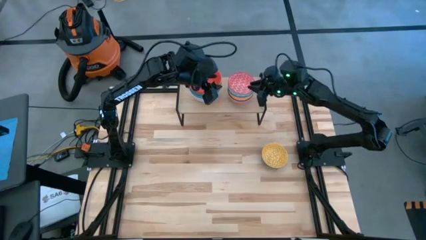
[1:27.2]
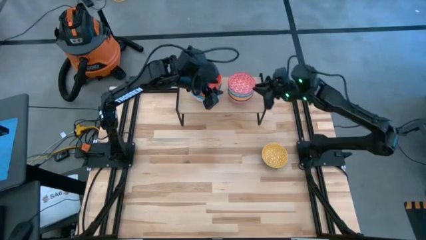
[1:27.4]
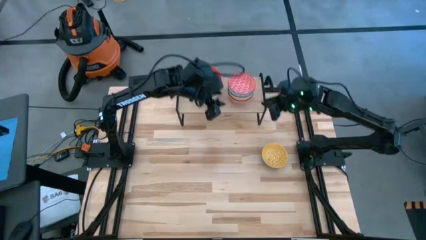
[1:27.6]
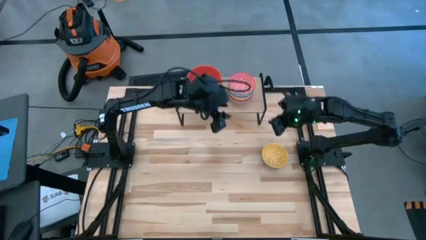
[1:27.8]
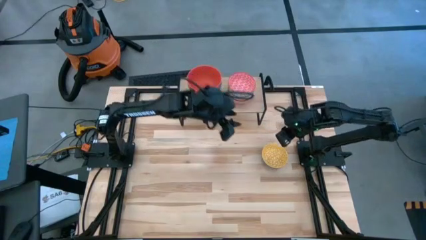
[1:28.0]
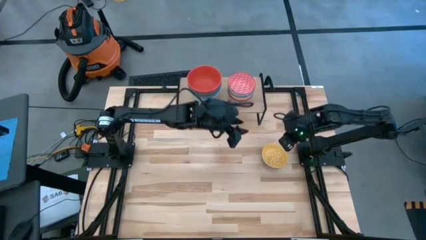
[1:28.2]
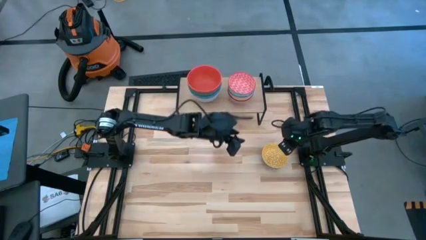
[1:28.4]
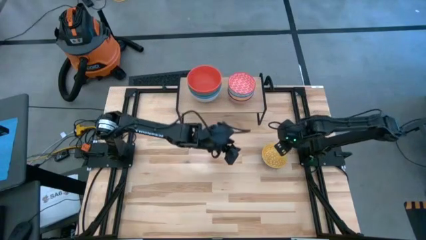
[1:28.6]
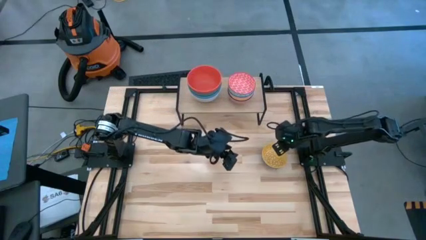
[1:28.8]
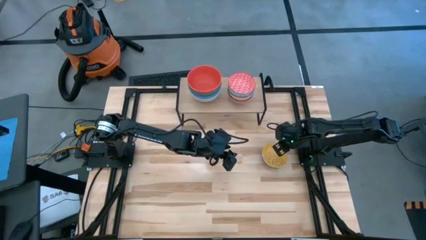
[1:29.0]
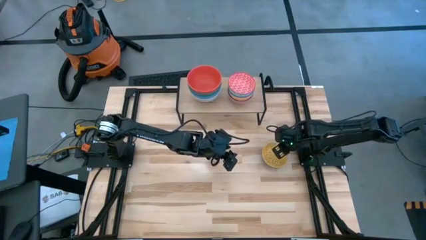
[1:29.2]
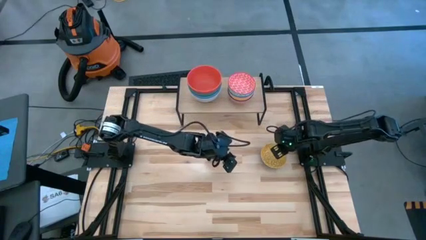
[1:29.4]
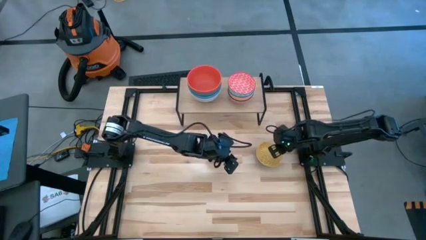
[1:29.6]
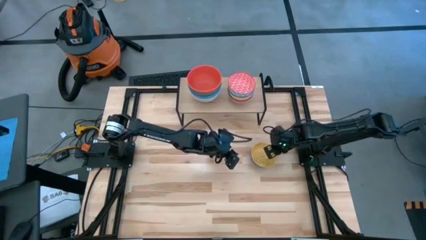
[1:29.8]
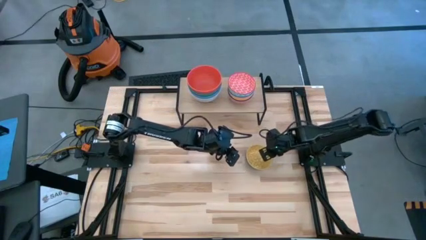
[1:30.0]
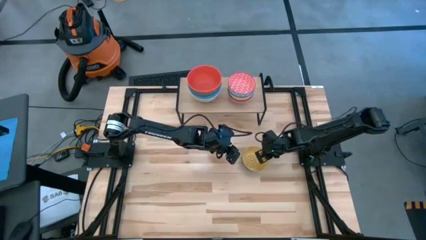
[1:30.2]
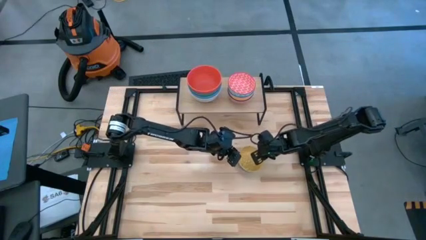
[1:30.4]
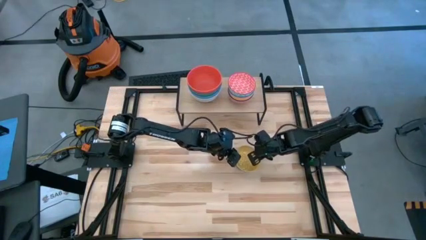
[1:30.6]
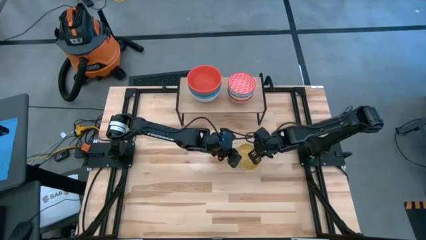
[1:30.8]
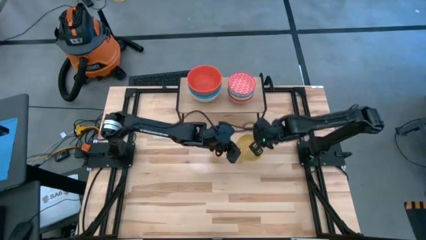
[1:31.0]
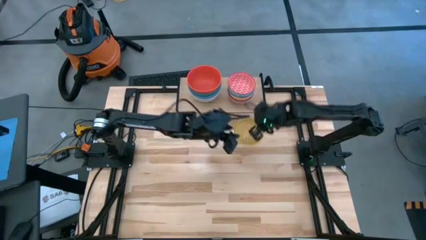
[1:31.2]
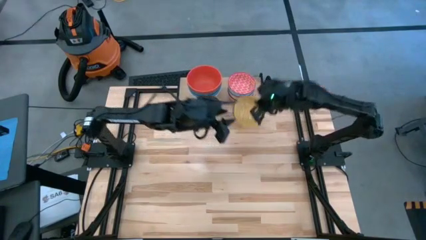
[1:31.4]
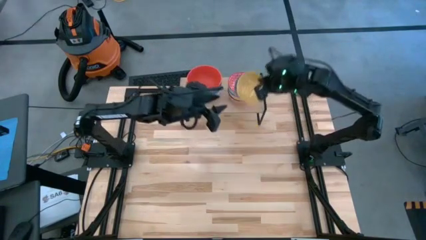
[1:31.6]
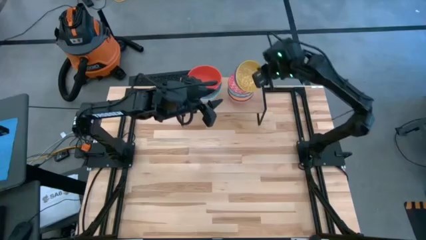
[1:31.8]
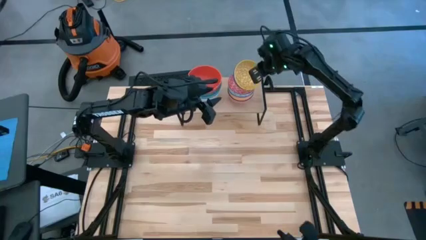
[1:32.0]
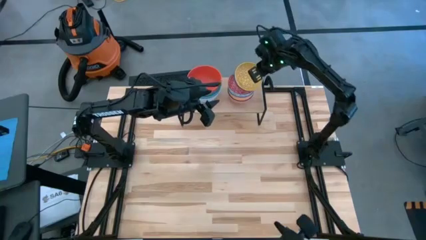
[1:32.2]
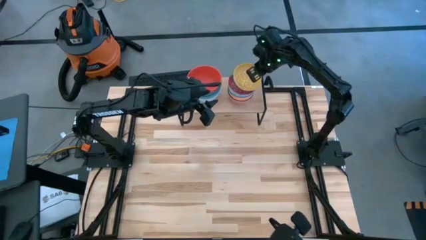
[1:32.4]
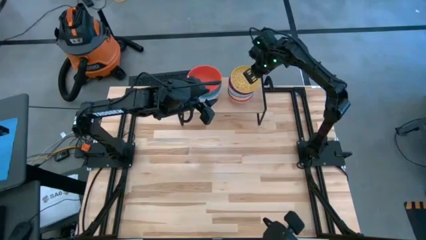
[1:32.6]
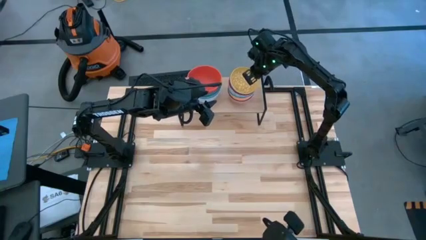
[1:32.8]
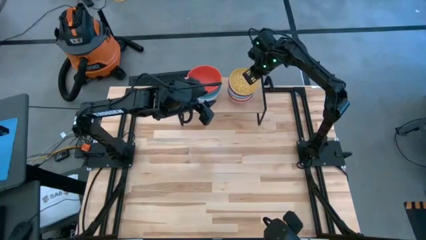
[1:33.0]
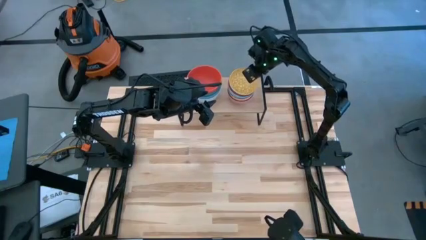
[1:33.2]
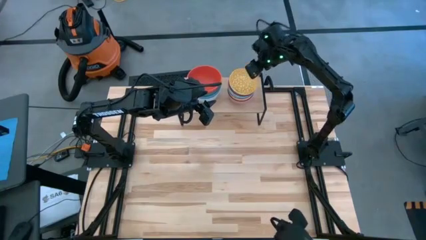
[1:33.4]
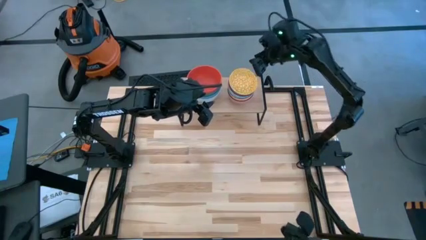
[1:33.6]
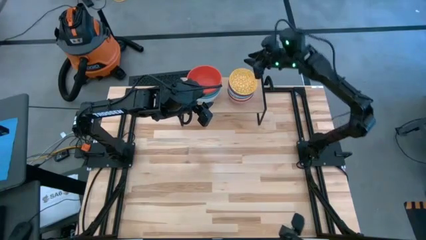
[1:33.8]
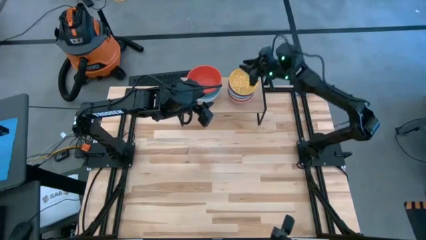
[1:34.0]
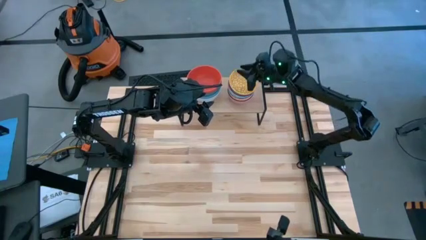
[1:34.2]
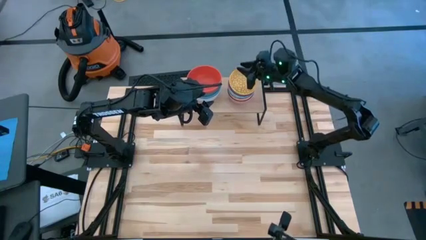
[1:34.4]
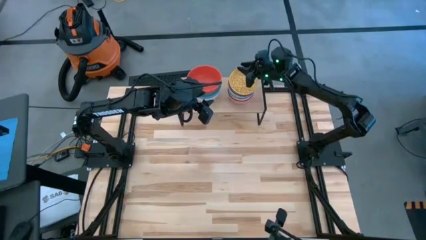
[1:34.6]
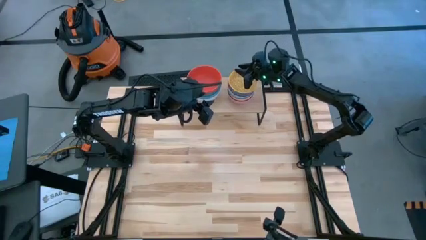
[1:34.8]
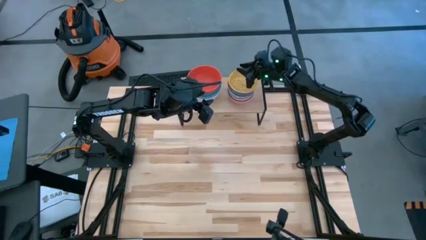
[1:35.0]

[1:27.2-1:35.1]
Task: Place and stack bowls onto a shelf
Stack the yellow bowl on top of the red bowl on the shelf

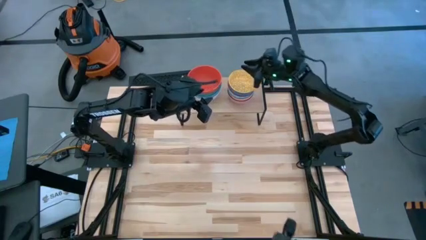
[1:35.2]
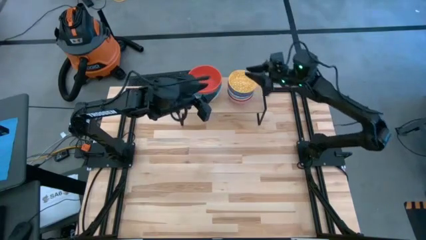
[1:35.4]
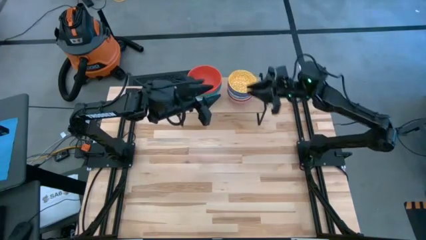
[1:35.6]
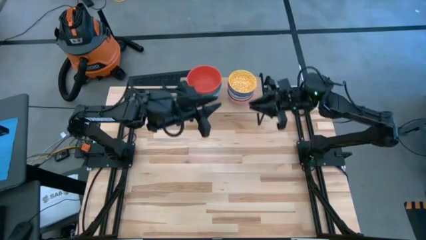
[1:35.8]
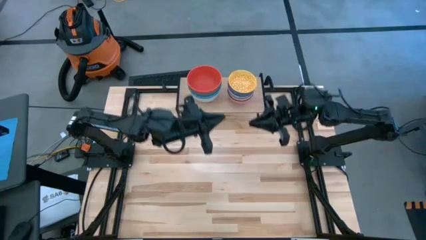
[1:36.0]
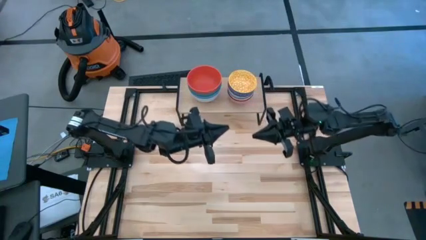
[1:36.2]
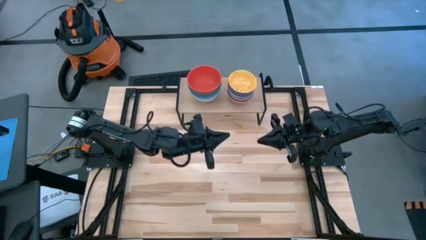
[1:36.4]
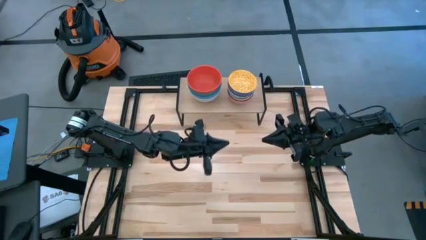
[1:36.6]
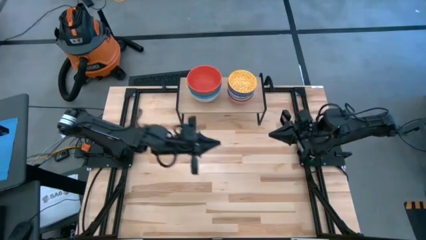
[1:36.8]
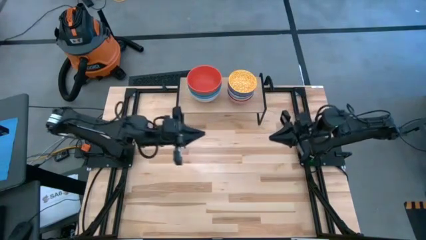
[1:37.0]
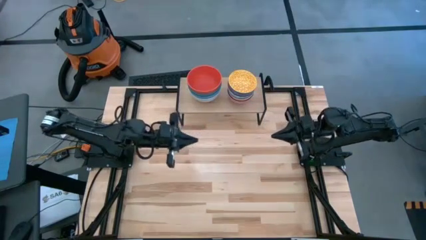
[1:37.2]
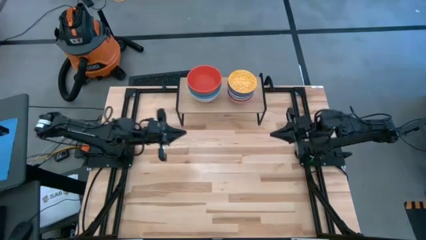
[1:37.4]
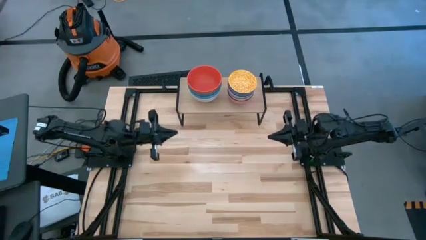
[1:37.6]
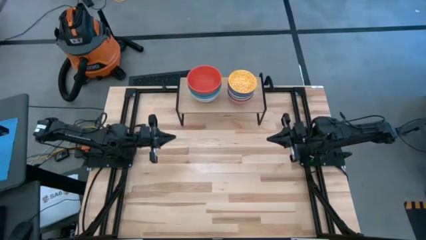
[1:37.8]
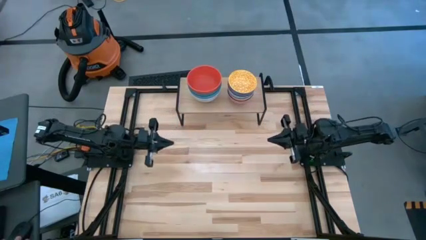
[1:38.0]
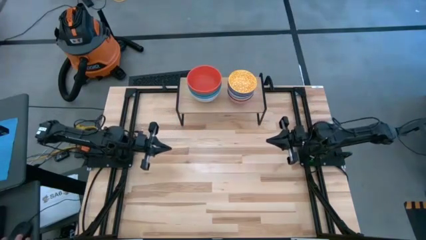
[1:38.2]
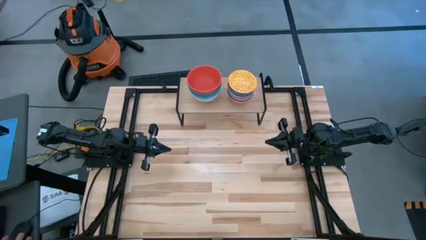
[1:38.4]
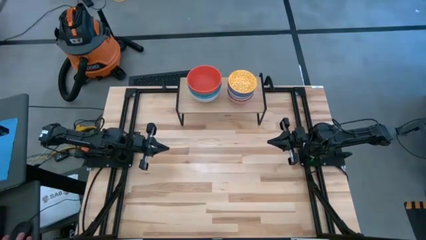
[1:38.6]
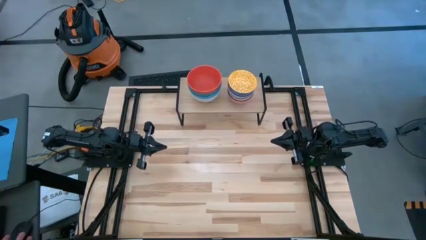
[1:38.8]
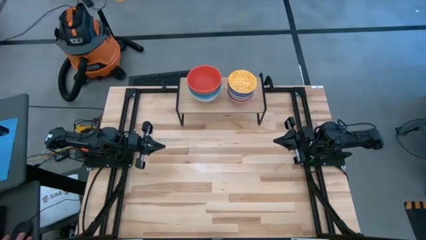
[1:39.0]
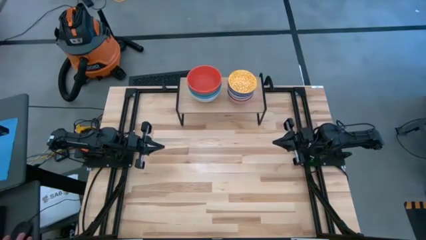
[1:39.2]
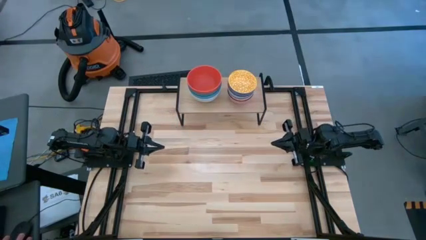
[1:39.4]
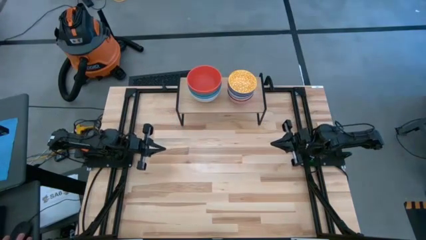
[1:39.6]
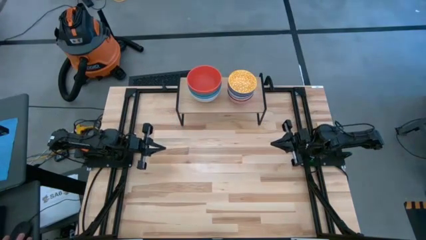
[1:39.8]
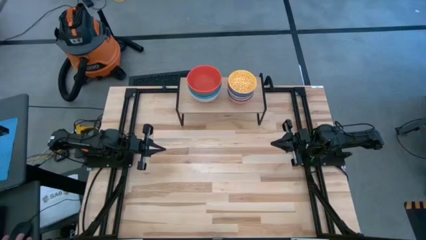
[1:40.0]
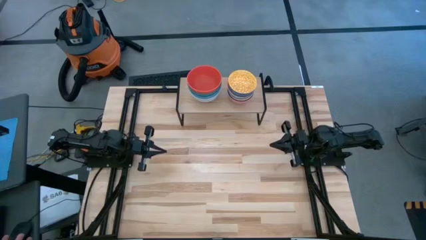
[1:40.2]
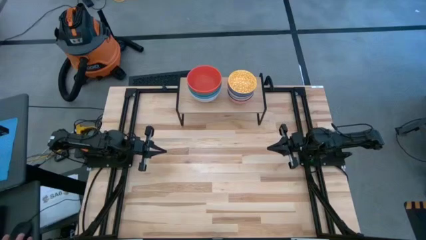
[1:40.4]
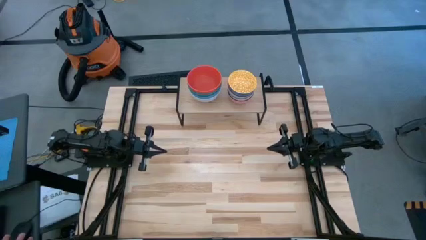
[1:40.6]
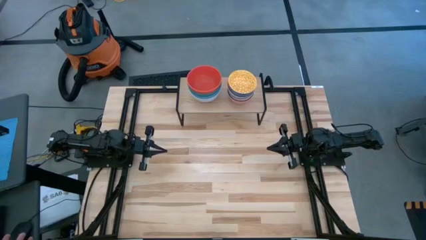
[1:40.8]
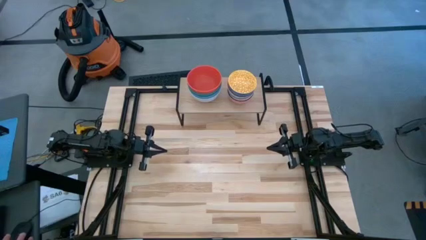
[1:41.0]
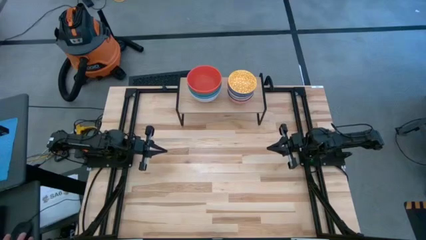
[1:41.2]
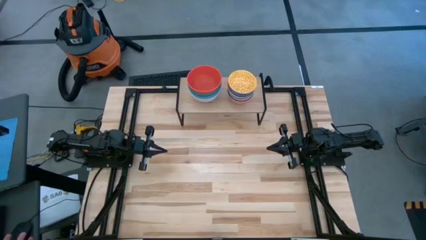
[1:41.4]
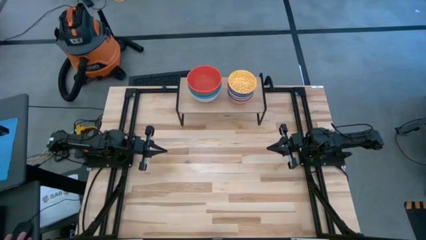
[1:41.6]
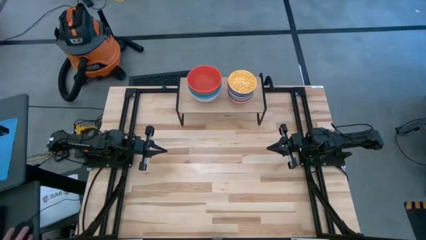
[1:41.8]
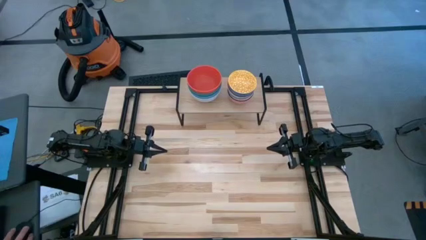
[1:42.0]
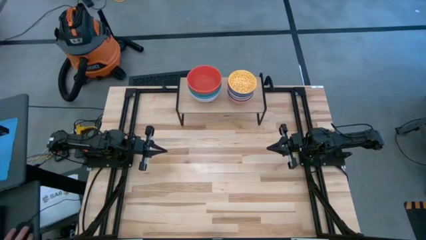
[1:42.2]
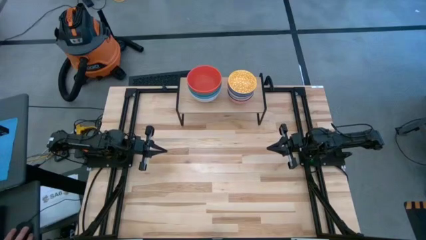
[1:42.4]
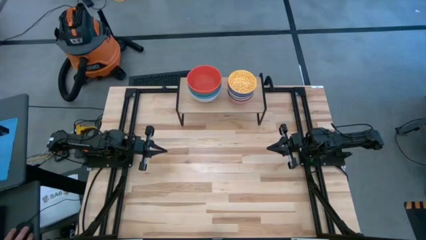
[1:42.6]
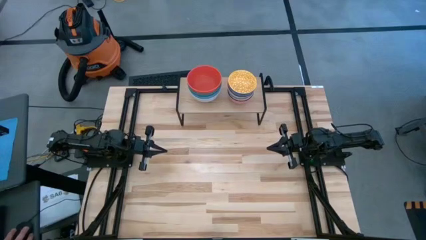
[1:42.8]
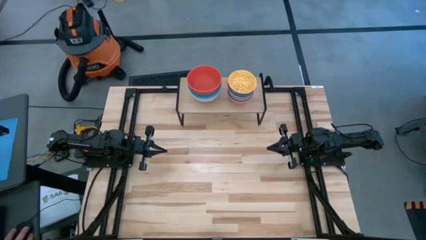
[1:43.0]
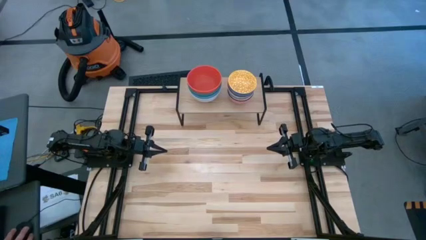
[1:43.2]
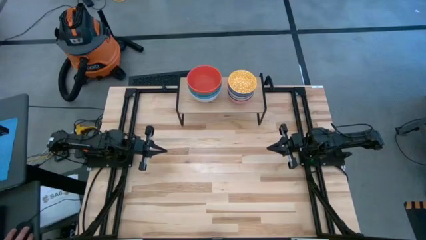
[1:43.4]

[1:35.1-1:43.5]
Return to Home Position

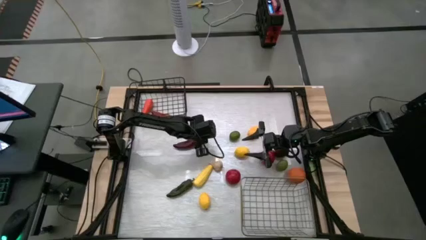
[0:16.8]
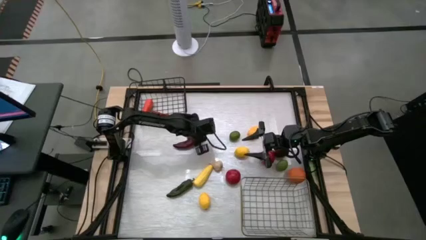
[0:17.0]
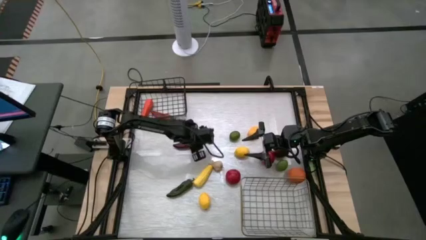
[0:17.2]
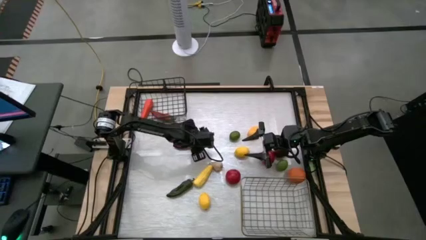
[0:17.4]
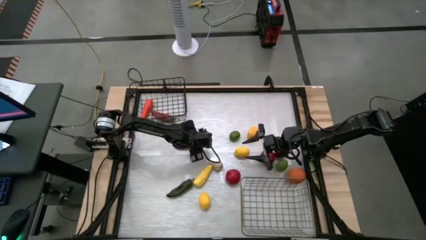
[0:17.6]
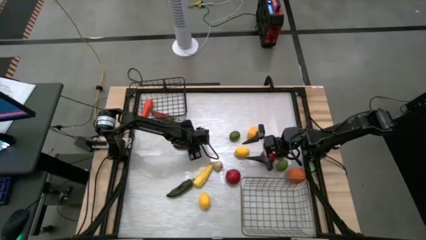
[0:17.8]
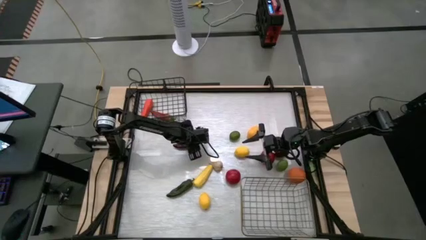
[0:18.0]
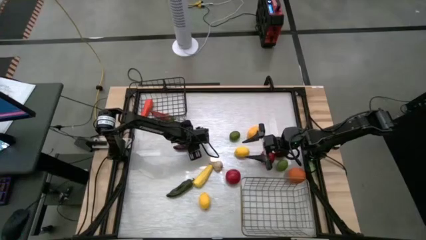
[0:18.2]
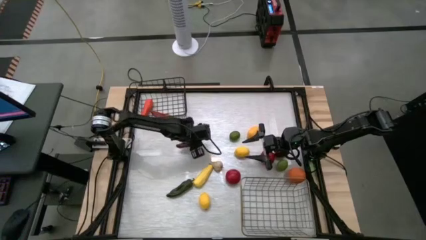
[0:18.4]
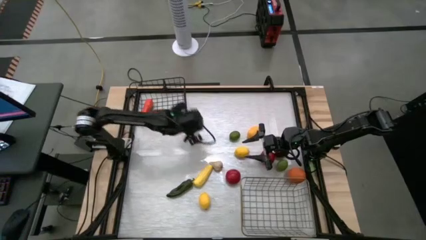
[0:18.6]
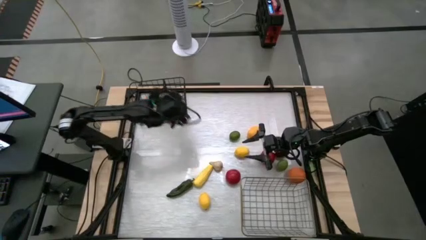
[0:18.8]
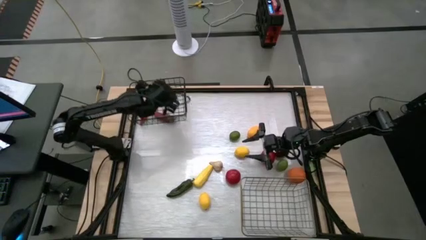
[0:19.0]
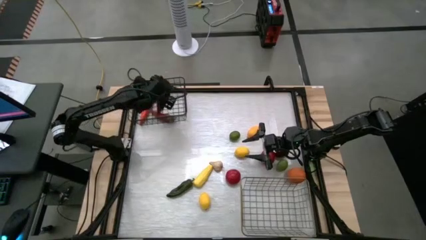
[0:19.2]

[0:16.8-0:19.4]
Task: Sort produce into baskets
Put the red bell pepper into the black wire basket
